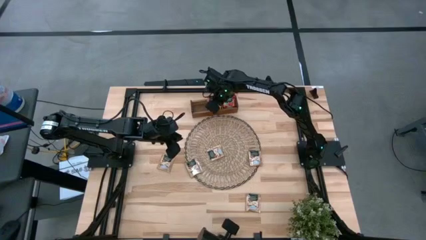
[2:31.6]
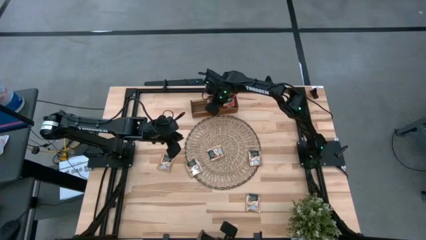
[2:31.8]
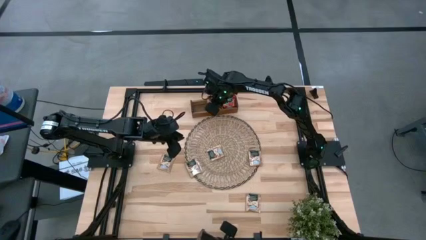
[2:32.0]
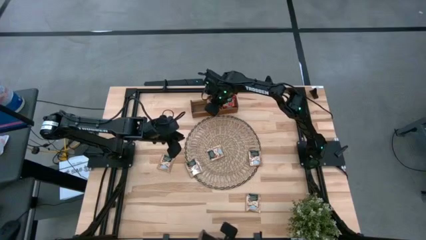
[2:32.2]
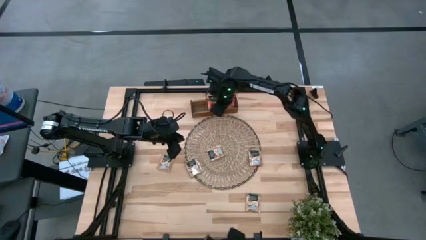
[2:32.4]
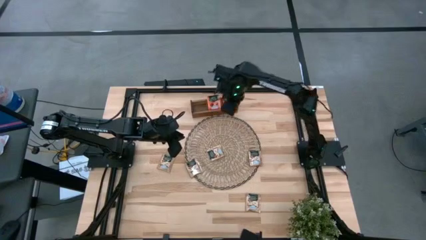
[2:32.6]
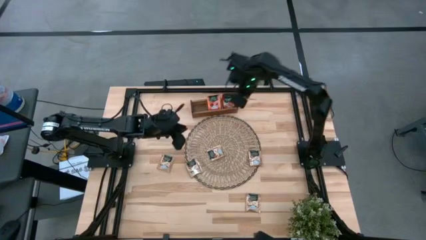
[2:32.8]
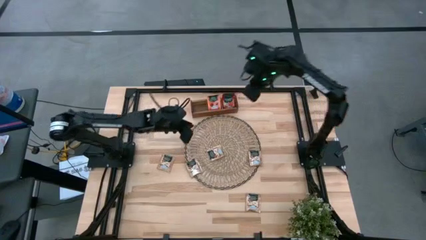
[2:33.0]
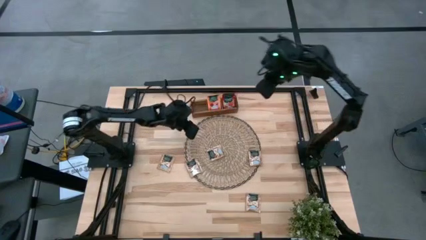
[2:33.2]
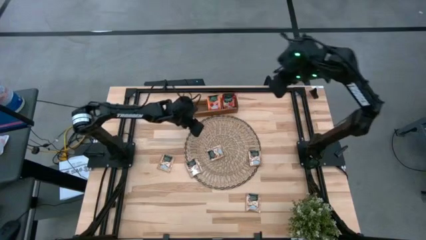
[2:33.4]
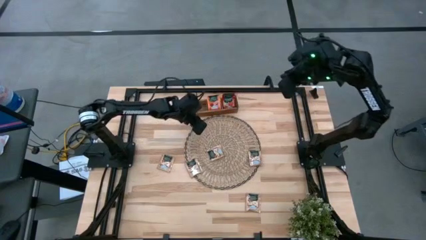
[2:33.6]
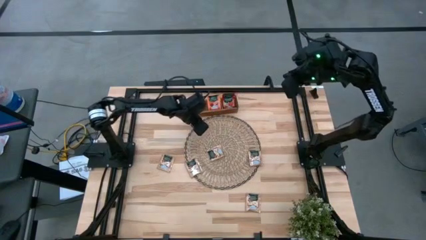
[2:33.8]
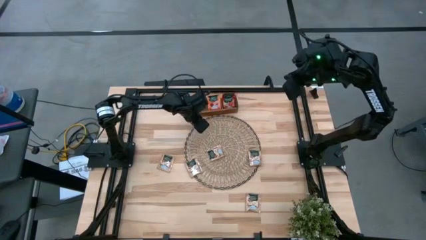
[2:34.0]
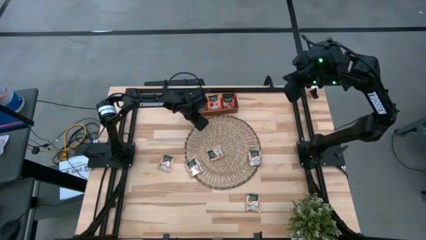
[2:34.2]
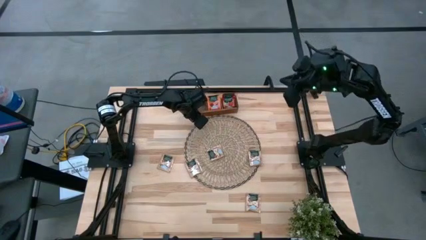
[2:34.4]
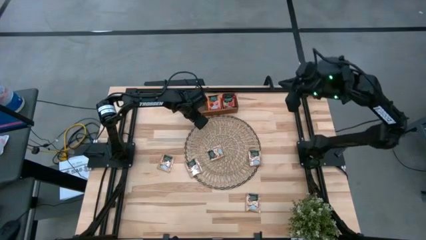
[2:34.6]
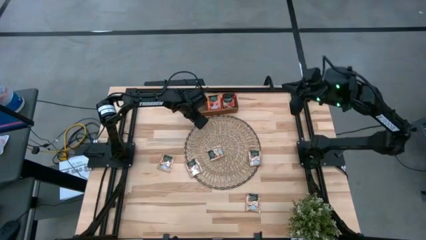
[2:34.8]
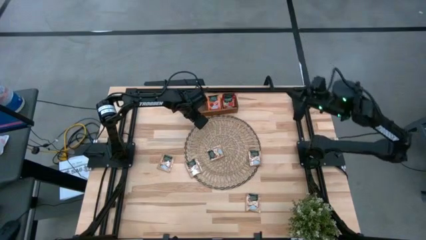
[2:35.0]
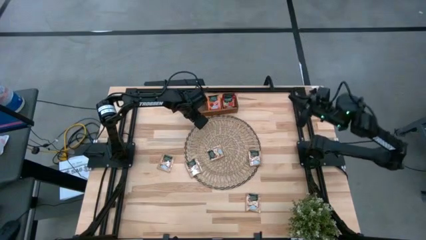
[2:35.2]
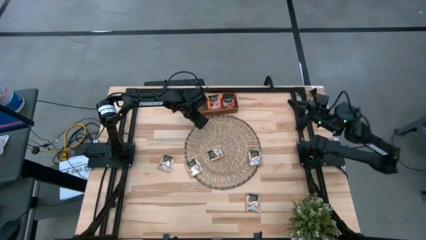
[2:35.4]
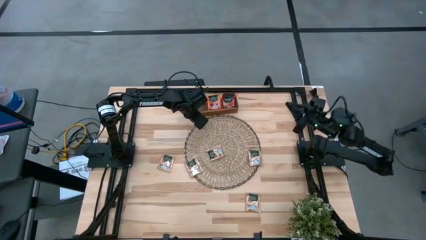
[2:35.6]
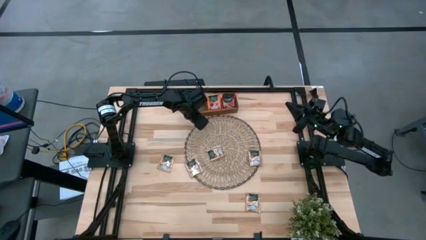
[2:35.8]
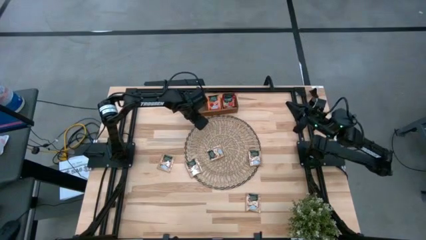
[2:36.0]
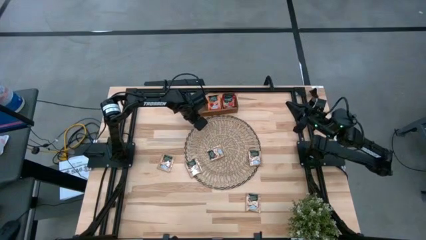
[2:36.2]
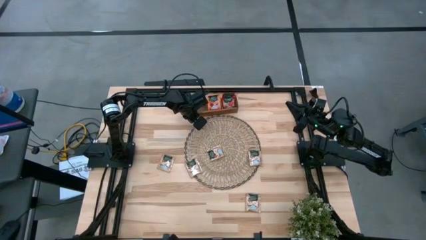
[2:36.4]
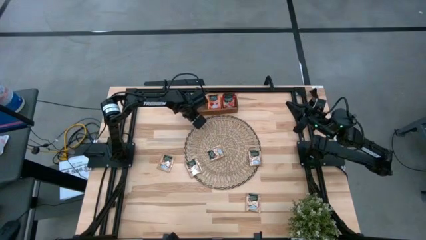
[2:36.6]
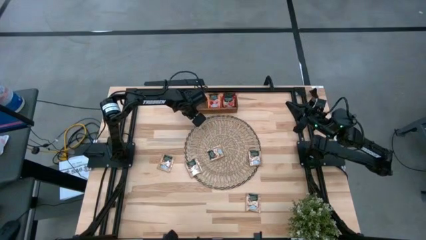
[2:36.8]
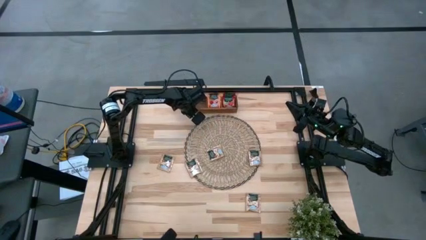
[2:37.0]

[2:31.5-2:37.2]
Task: Pick & Place Tea
Adjust the wooden organizer on the table

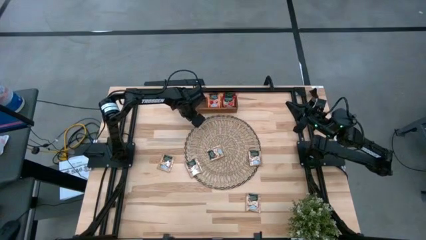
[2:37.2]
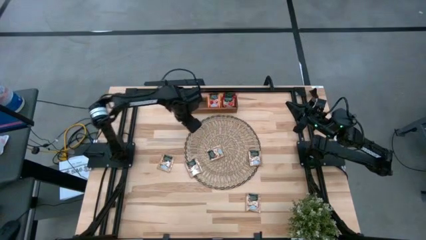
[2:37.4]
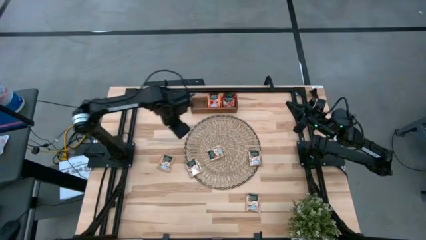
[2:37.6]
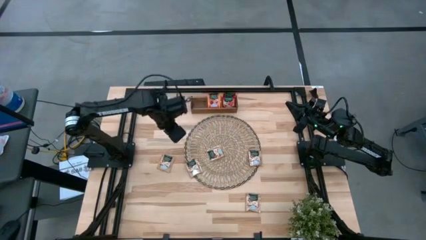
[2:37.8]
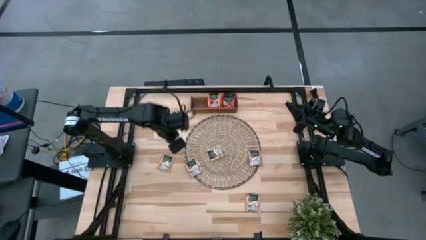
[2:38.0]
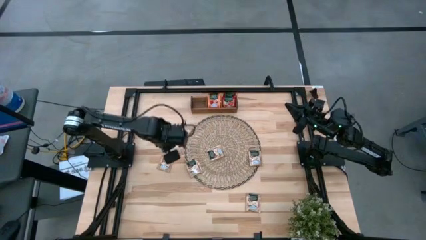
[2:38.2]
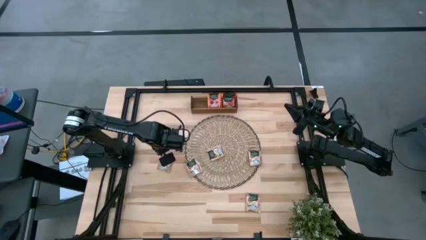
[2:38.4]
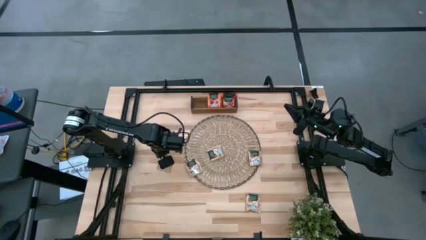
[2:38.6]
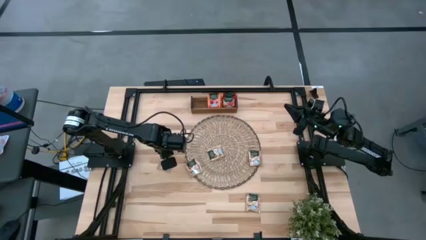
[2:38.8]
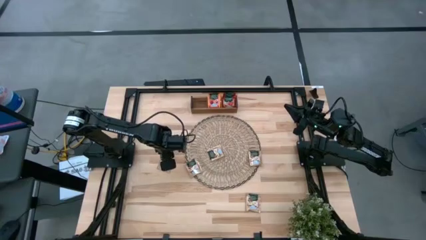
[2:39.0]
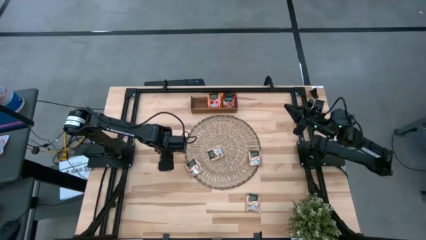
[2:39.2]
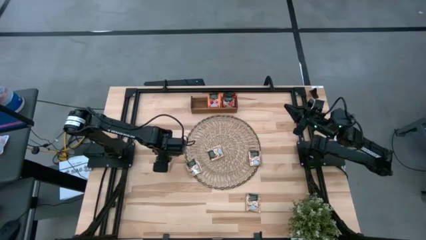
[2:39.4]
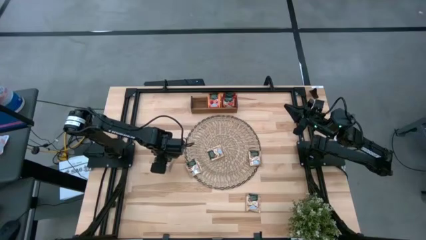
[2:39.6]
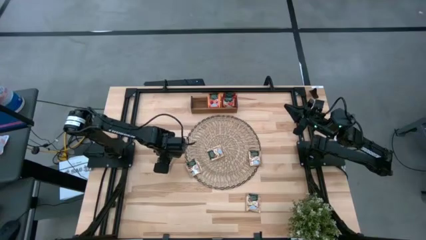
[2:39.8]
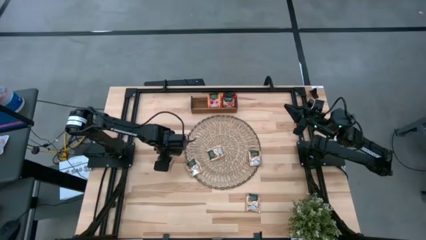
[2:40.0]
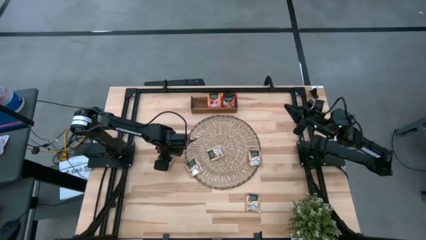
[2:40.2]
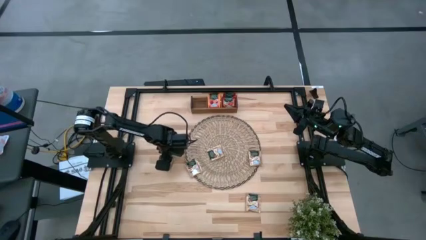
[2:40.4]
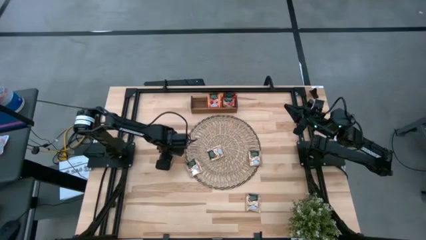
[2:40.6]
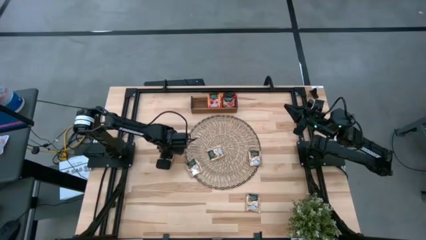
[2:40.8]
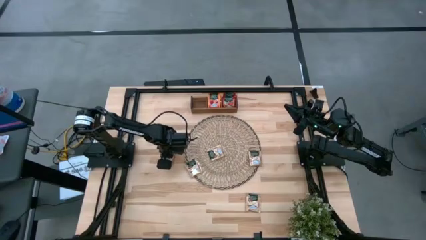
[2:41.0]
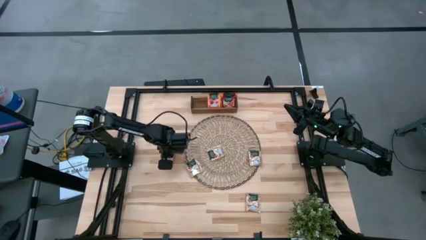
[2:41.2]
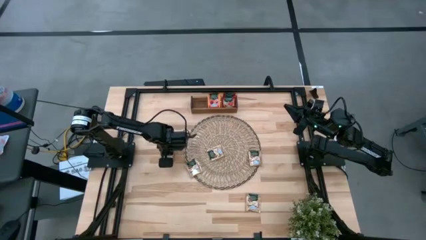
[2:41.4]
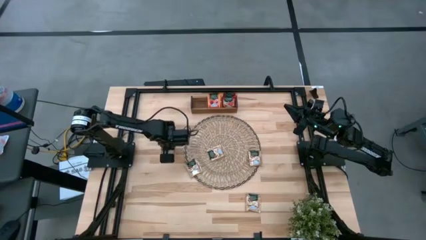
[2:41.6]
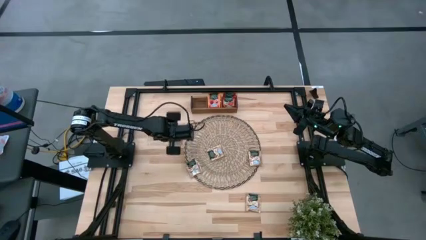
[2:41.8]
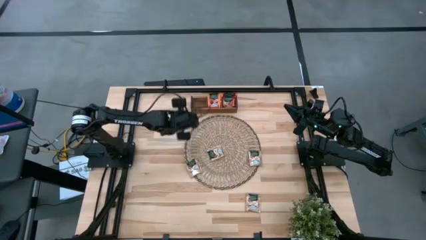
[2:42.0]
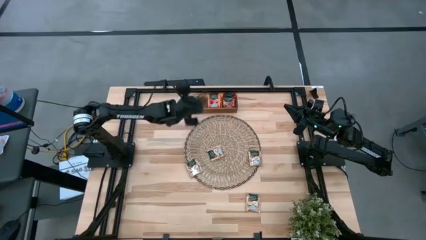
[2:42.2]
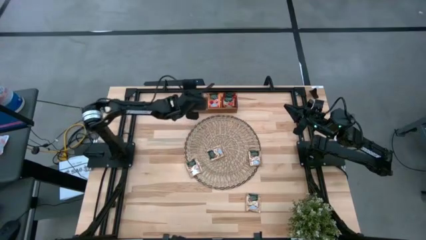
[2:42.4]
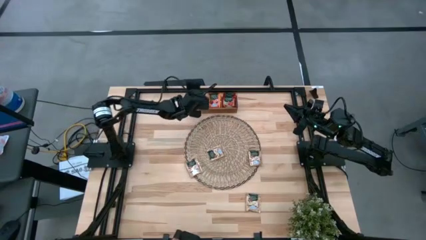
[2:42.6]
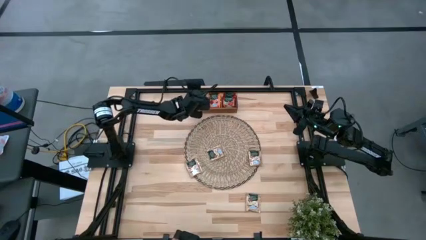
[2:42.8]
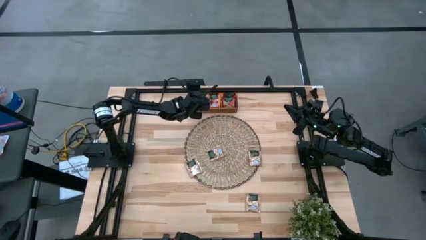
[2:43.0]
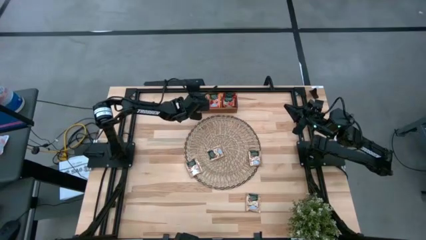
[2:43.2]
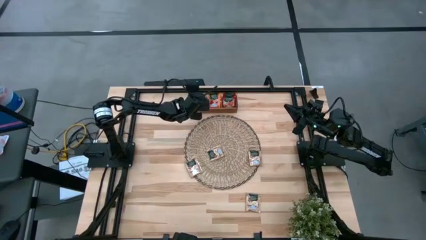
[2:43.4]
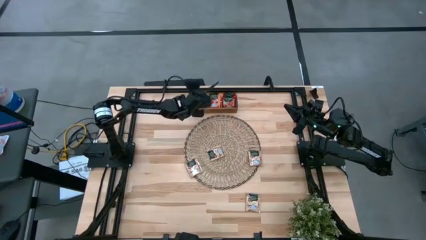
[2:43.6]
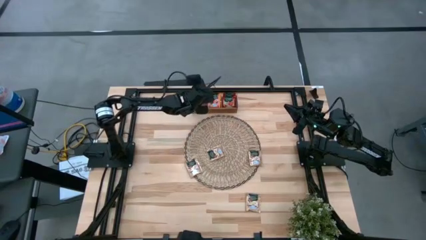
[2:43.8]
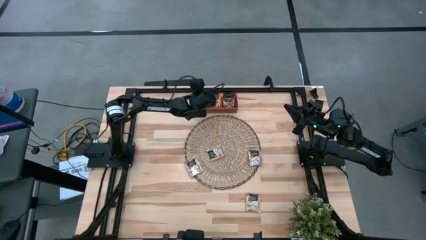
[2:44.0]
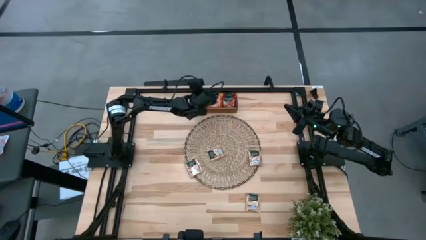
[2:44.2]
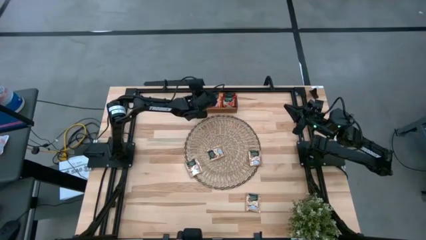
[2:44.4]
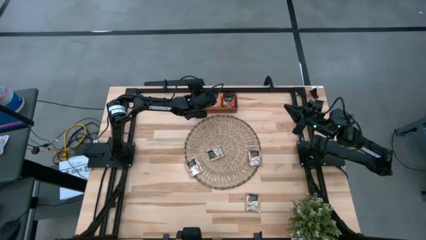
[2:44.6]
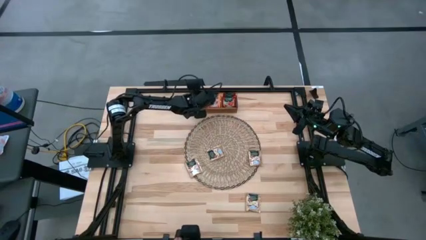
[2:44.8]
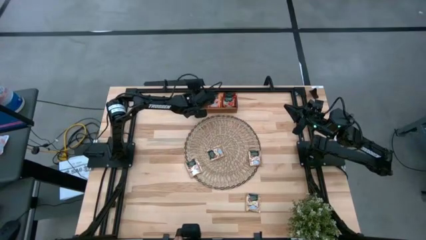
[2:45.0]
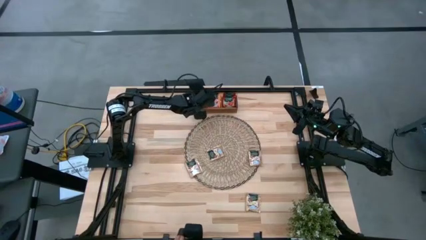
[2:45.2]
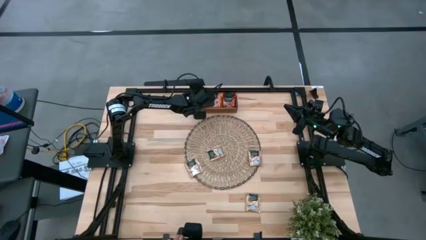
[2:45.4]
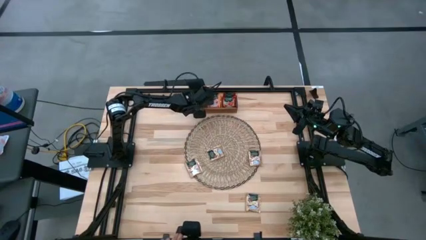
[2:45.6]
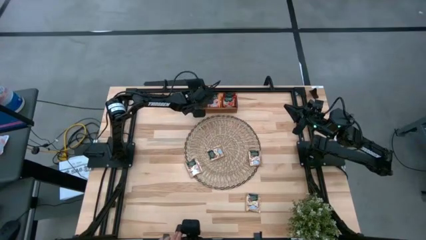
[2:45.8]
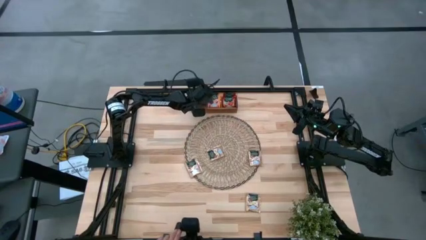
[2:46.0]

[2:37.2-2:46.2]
Put the brown tea bag into the left section of the wooden organizer
